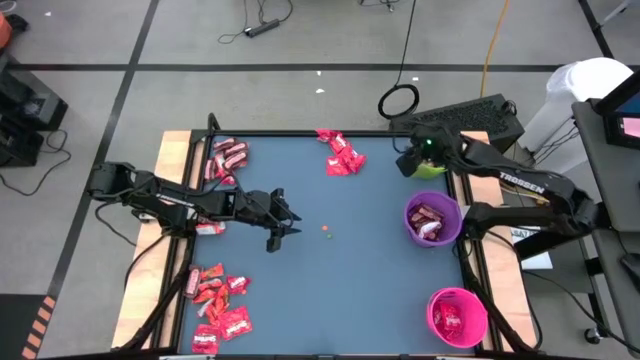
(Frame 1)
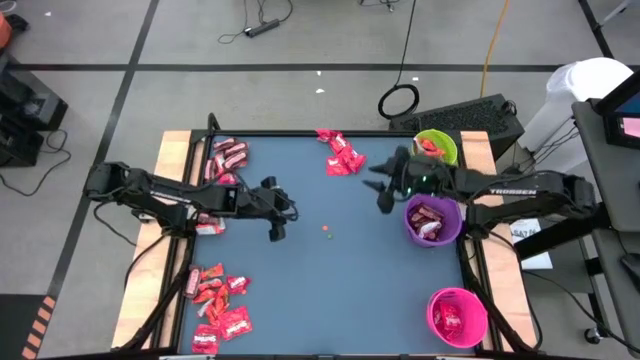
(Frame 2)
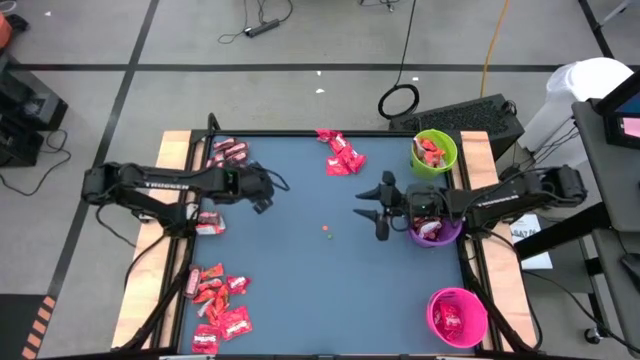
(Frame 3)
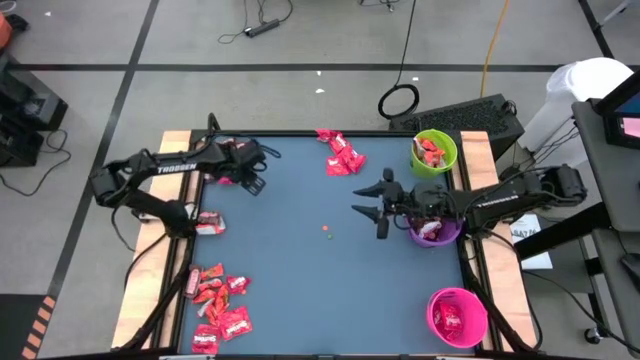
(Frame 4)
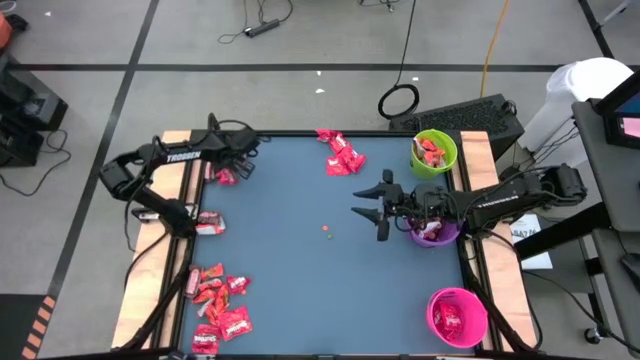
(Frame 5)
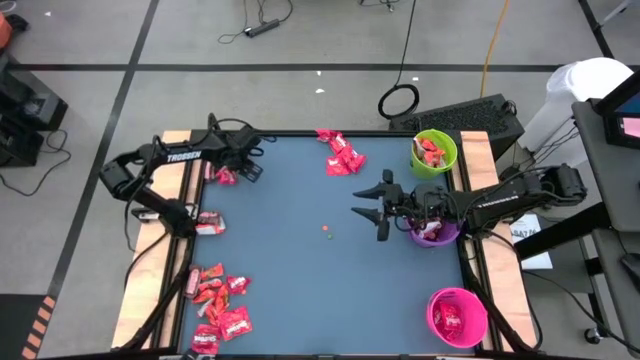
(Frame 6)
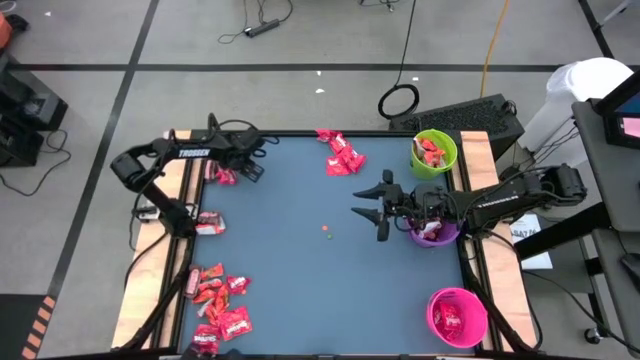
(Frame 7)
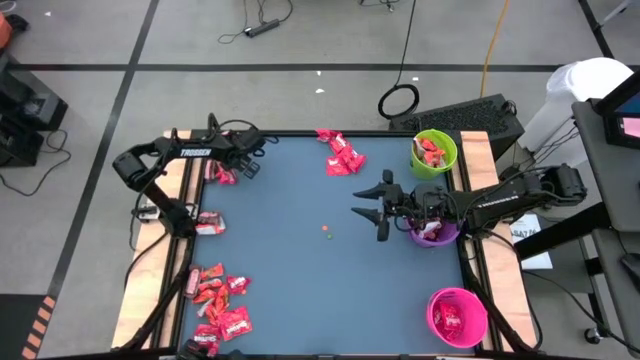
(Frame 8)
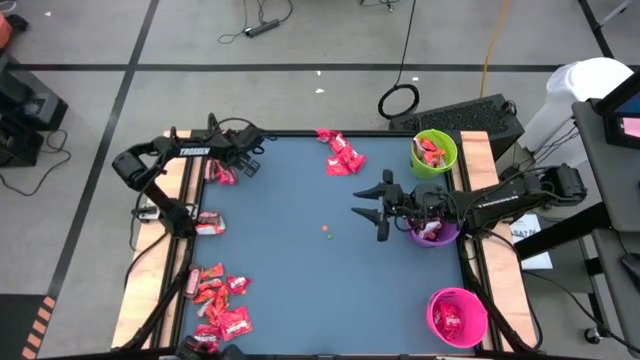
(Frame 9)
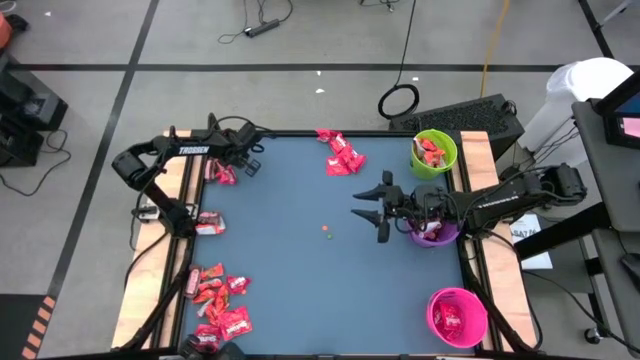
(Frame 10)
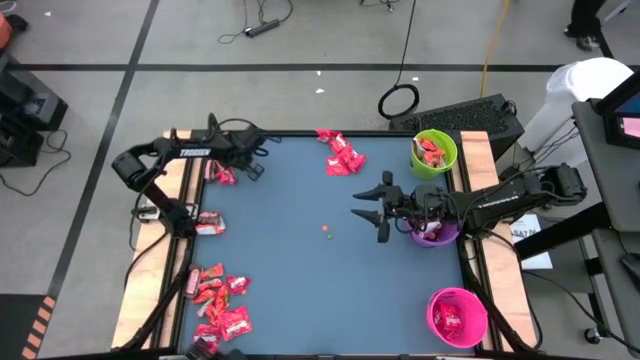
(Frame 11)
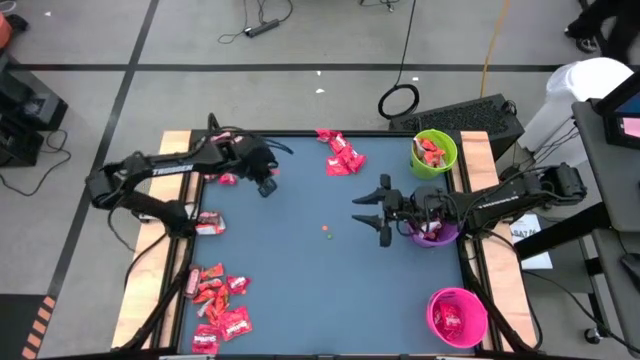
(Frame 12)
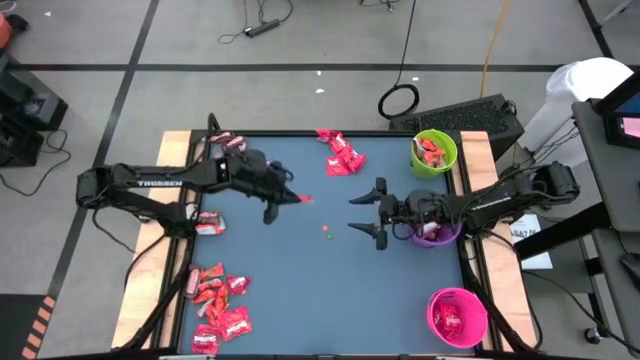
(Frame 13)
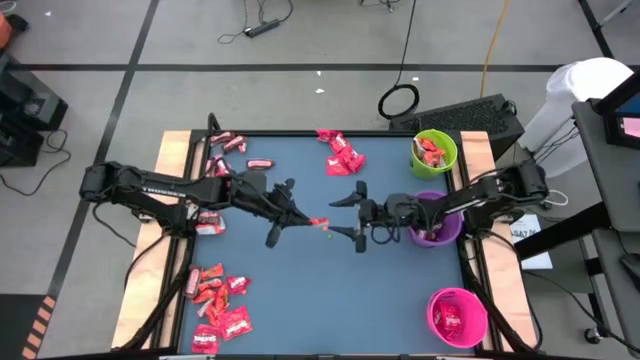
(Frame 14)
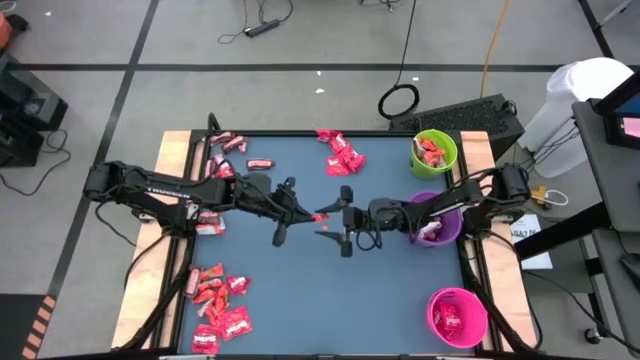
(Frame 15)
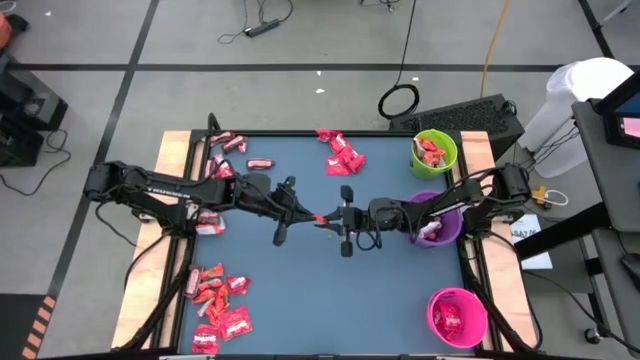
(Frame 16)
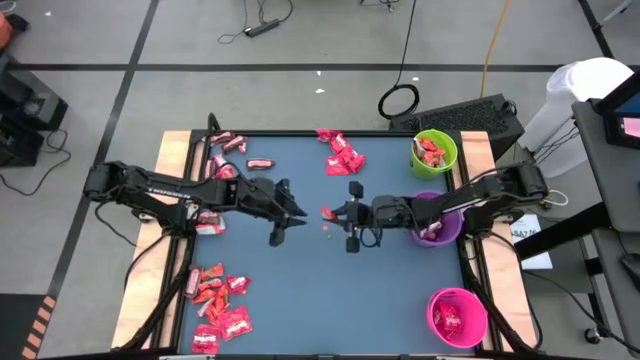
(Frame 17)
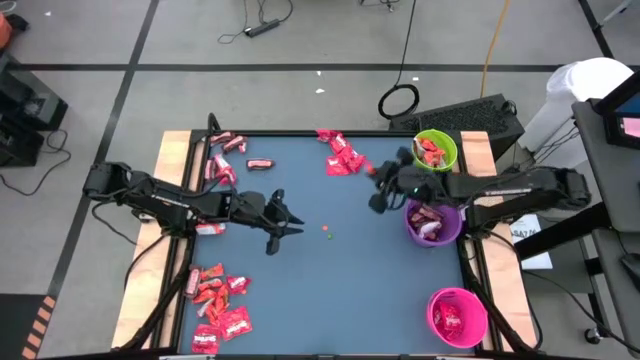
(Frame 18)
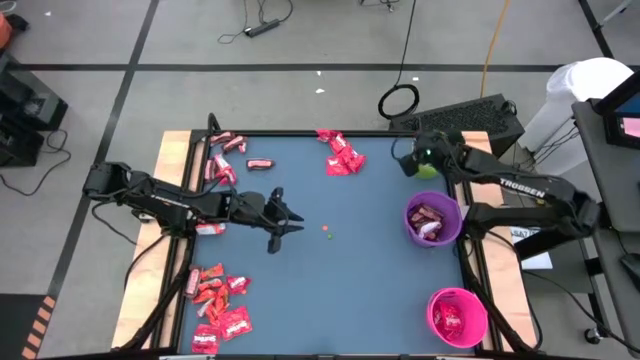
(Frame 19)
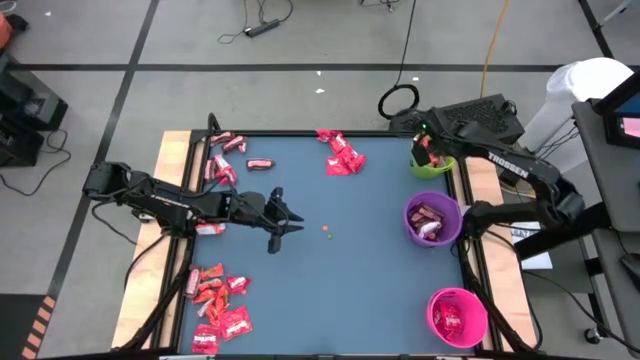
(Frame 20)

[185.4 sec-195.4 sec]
Task: Organize candy in baskets
Put the orange chocolate bar into the green bucket

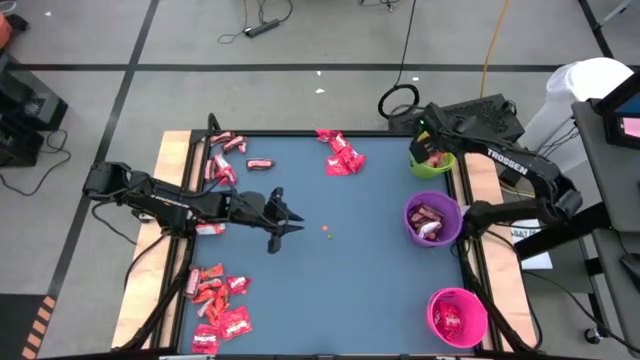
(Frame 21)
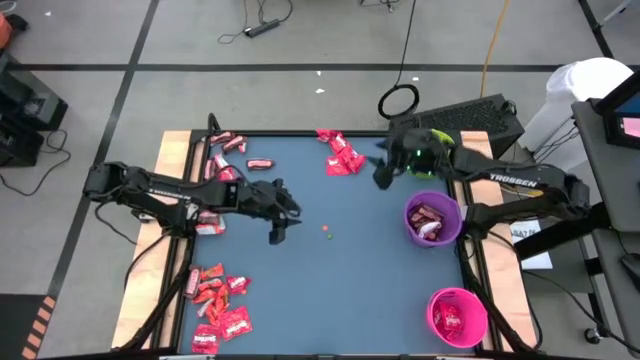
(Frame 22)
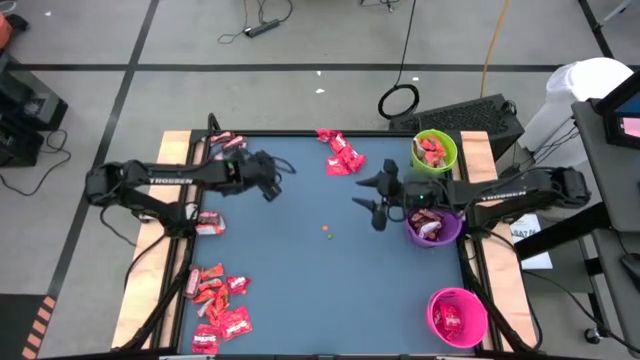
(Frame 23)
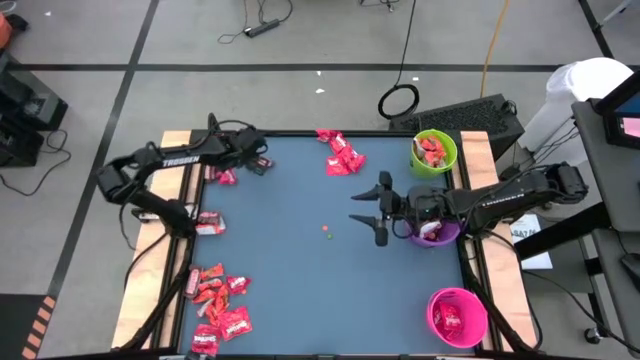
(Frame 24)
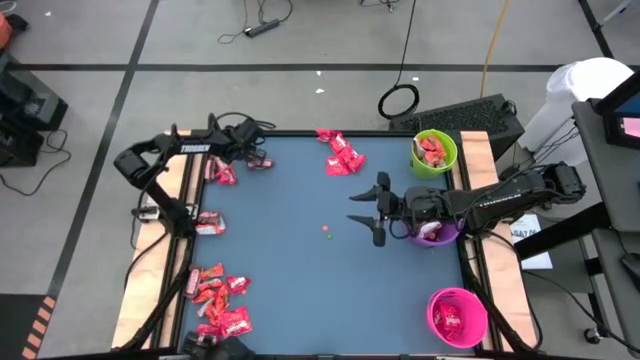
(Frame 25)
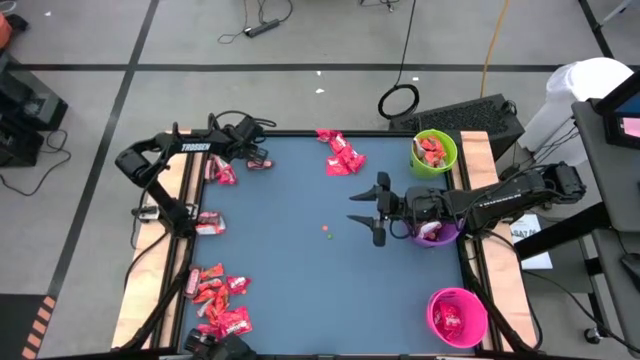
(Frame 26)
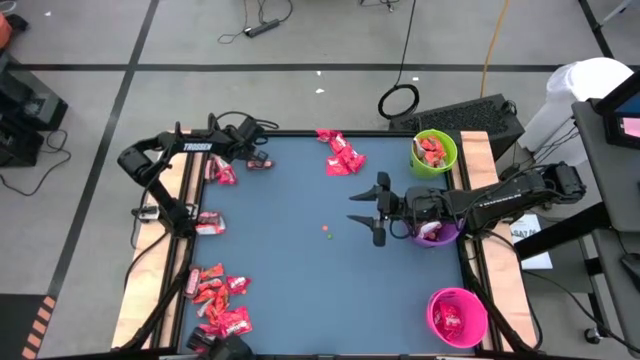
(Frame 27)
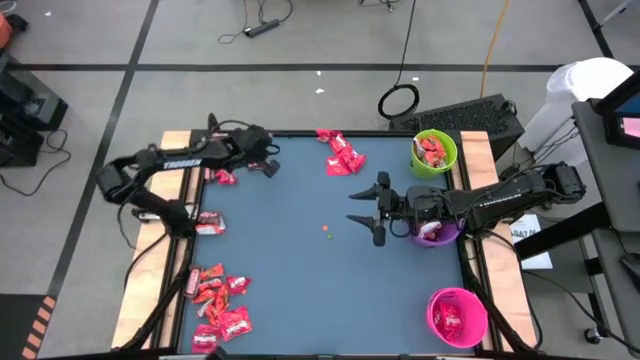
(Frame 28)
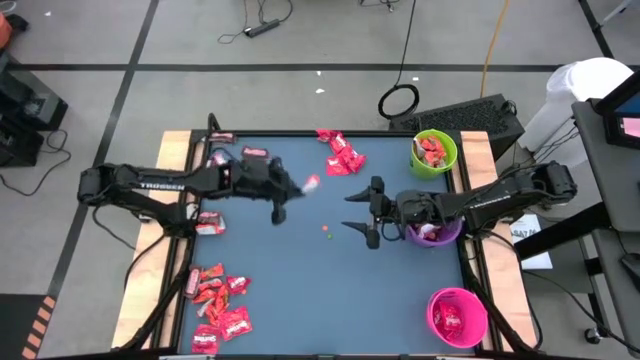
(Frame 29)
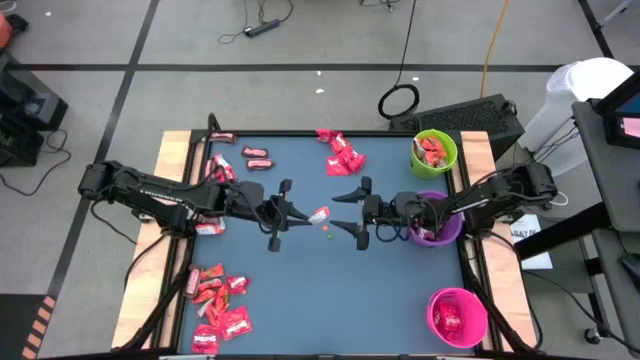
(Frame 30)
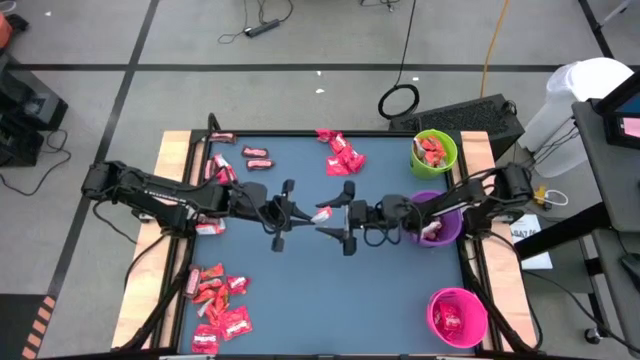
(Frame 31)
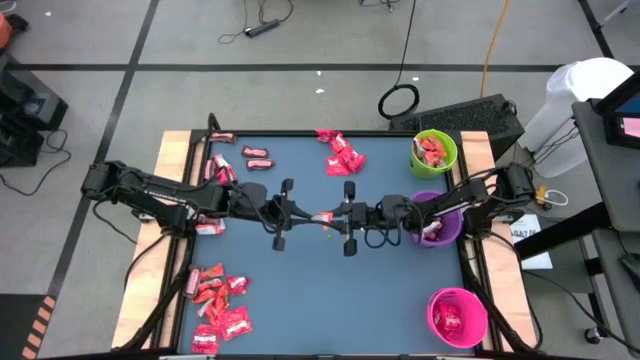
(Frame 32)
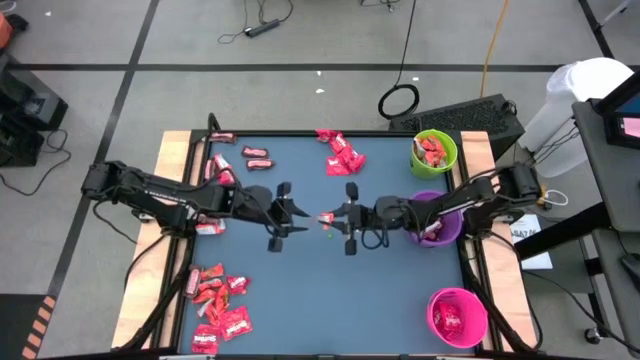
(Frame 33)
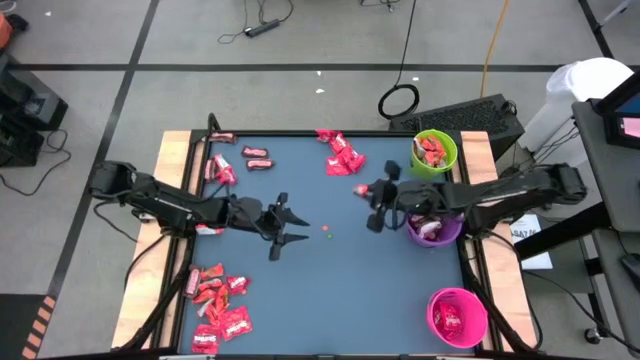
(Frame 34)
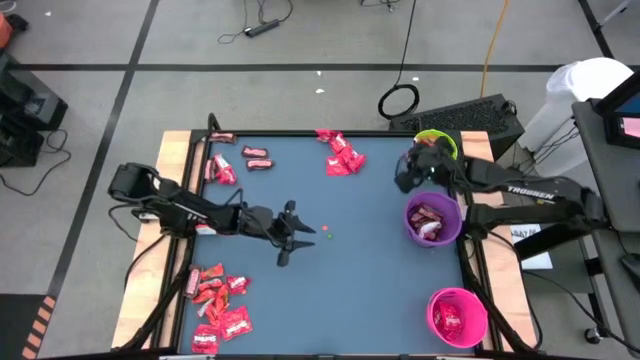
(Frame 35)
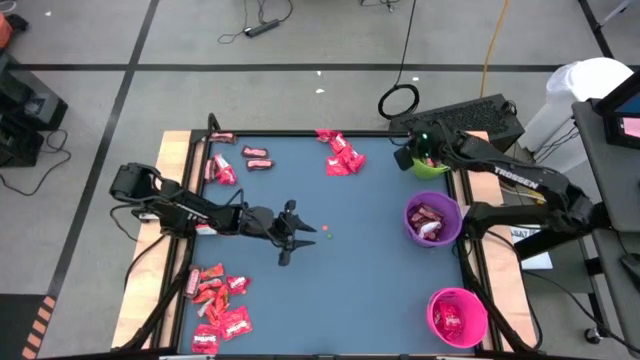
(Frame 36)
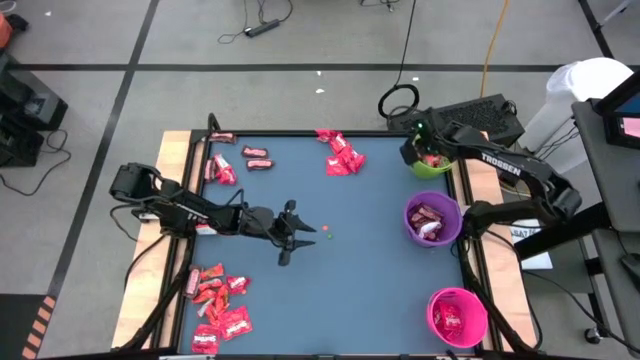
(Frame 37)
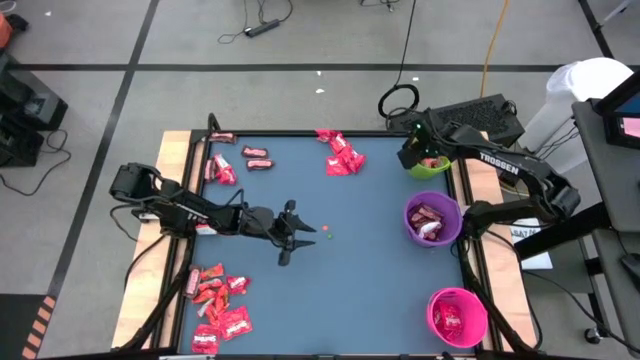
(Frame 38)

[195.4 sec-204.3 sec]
Put the orange chocolate bar into the green bucket

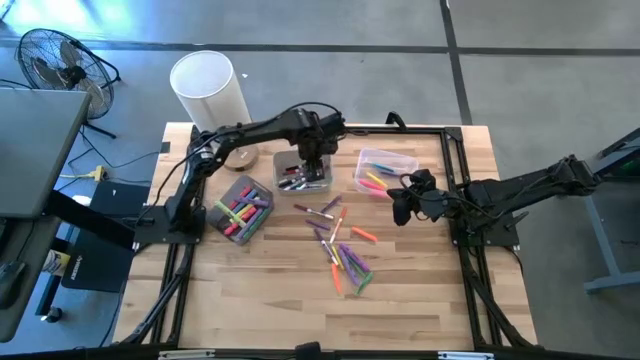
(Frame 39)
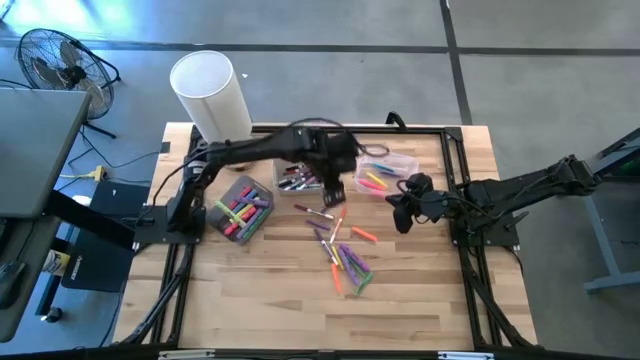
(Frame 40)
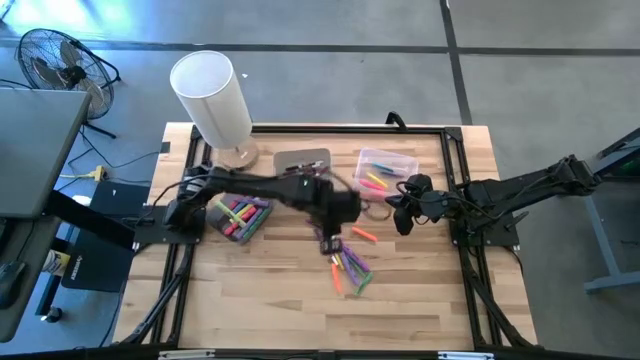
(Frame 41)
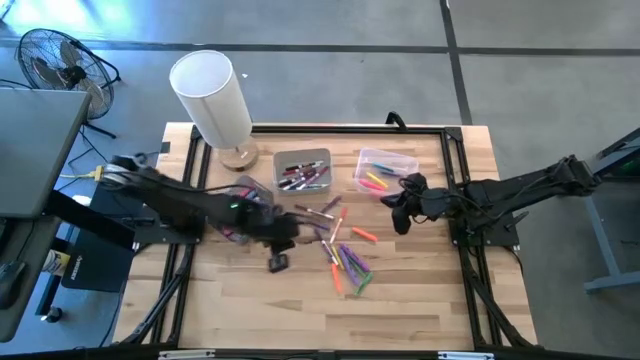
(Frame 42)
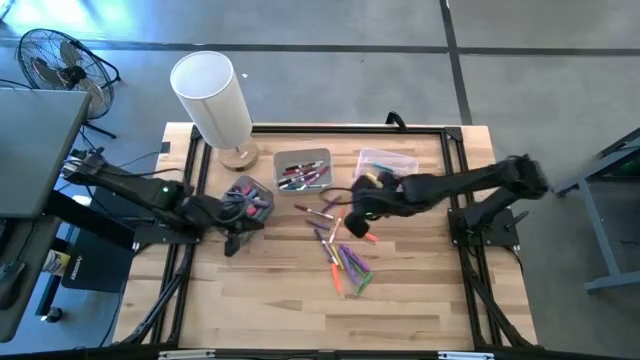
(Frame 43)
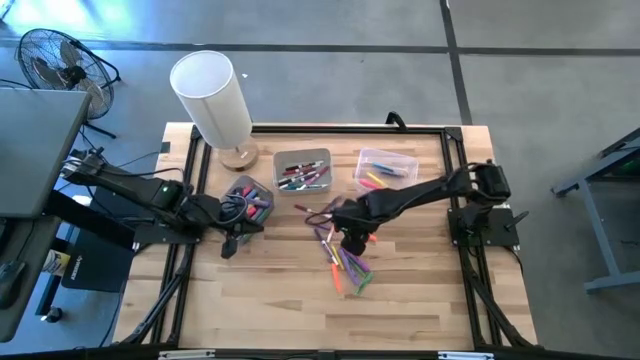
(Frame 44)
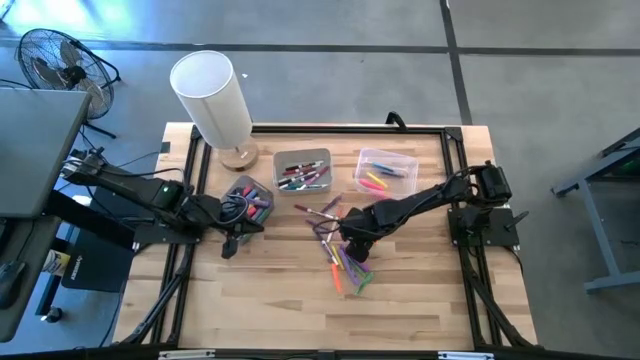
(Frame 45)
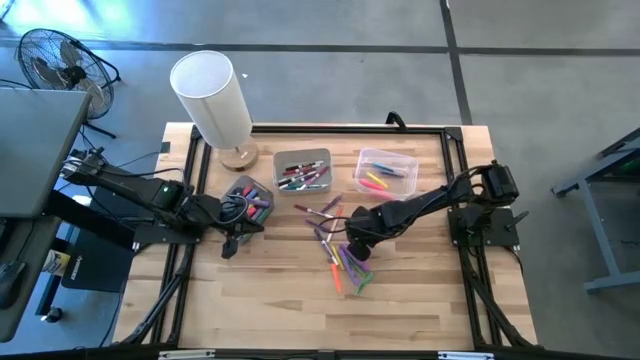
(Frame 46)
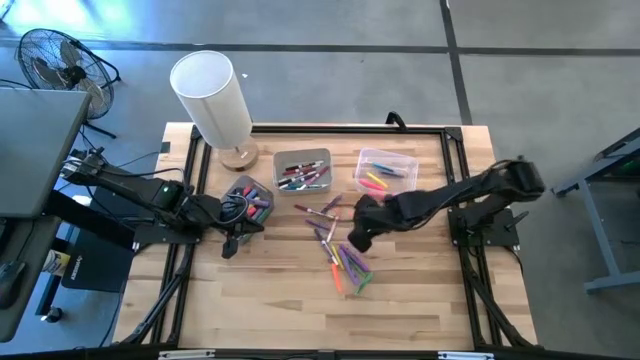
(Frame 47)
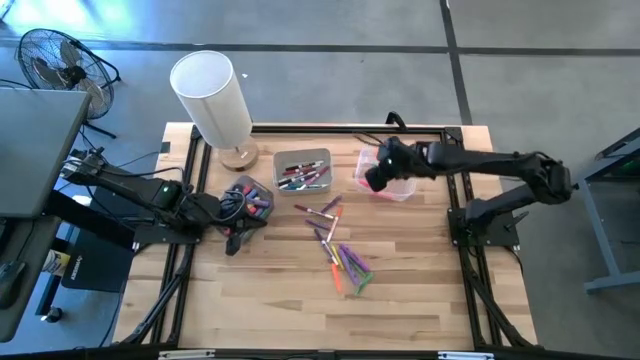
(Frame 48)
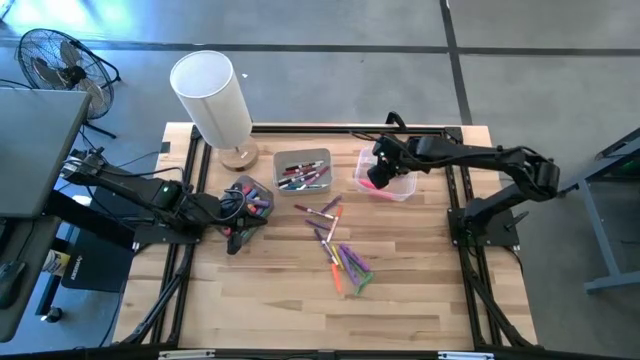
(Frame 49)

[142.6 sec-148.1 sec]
Task: Pick & Place Markers
Put the orange pen into the transparent bin
